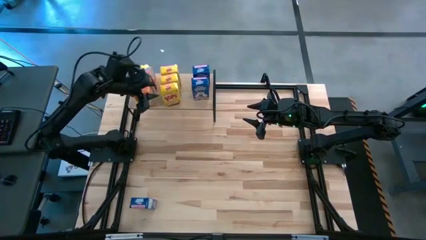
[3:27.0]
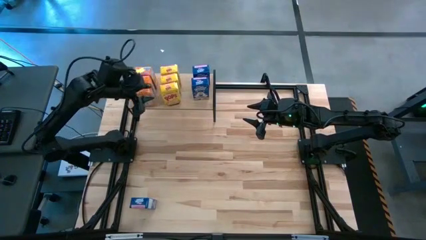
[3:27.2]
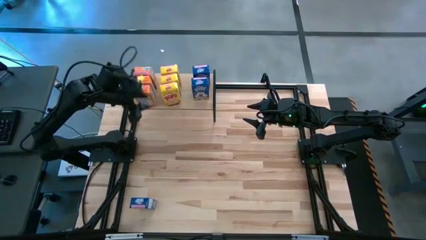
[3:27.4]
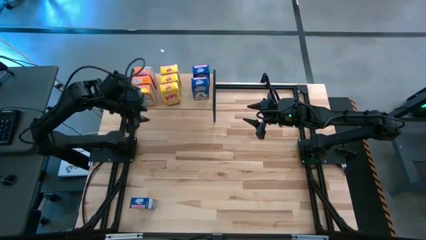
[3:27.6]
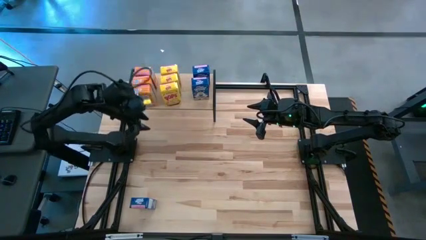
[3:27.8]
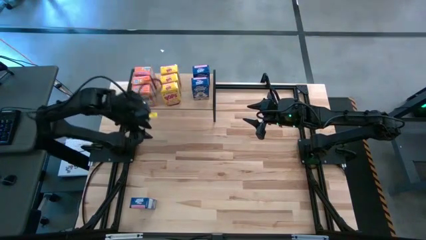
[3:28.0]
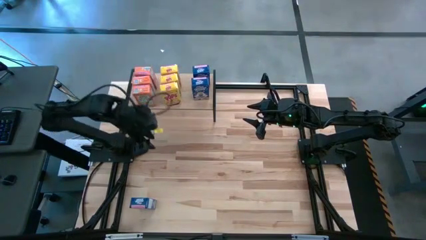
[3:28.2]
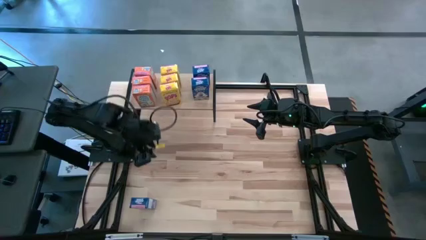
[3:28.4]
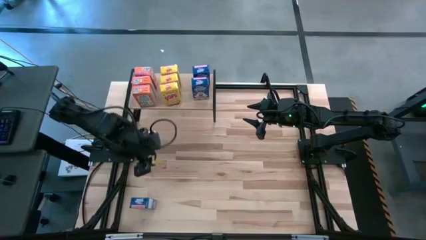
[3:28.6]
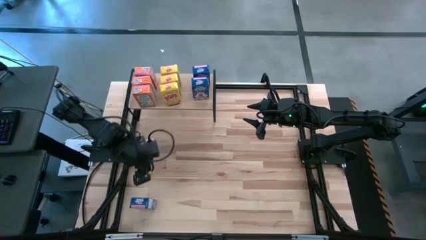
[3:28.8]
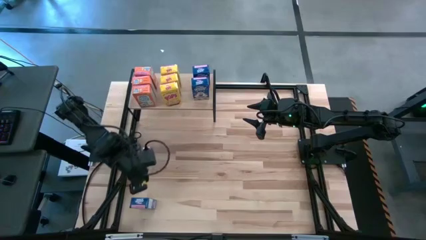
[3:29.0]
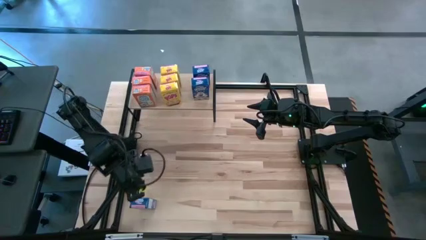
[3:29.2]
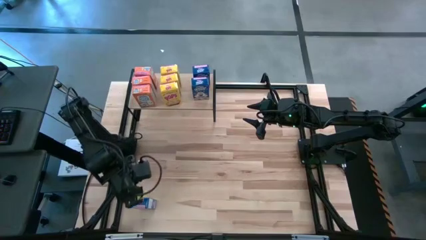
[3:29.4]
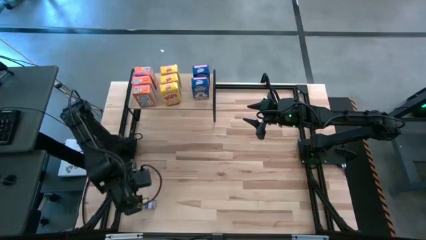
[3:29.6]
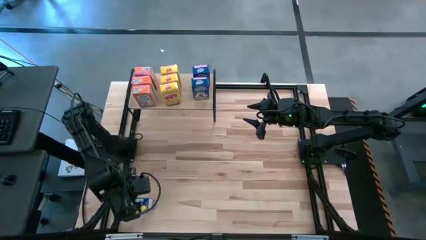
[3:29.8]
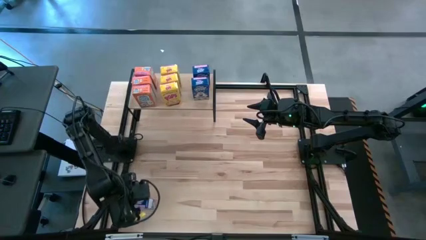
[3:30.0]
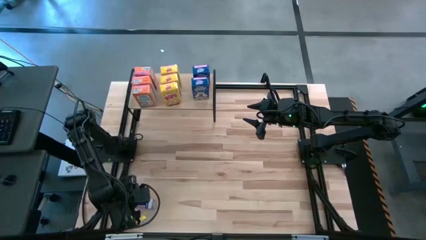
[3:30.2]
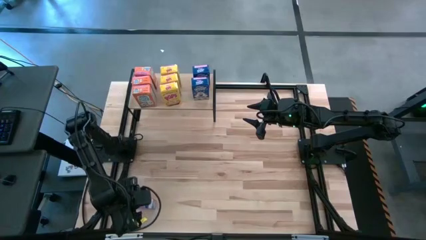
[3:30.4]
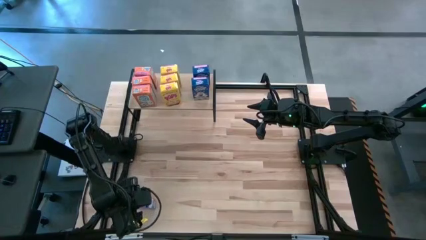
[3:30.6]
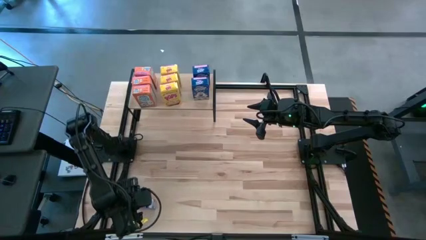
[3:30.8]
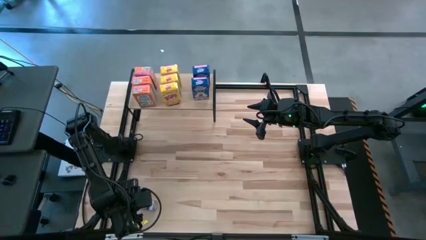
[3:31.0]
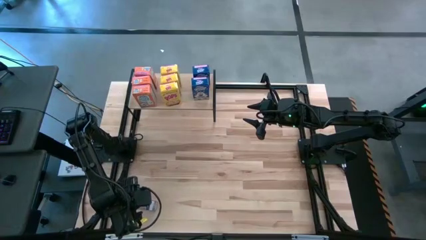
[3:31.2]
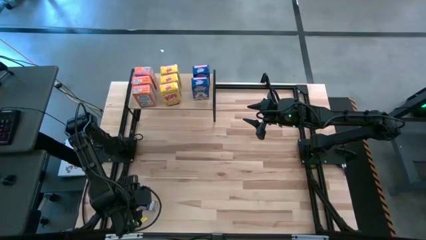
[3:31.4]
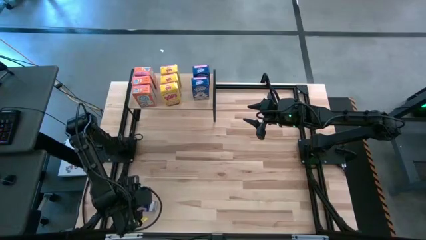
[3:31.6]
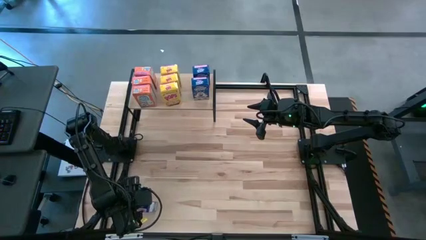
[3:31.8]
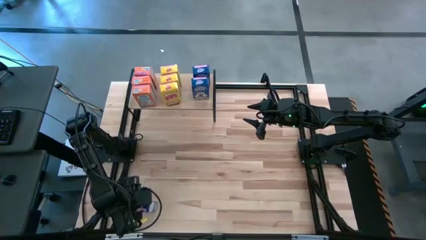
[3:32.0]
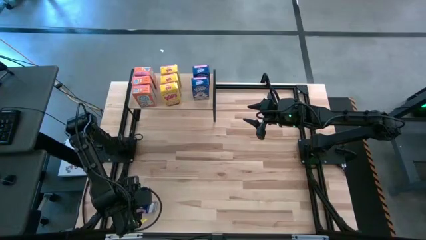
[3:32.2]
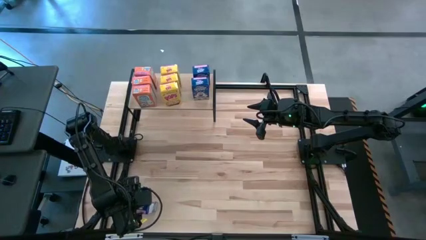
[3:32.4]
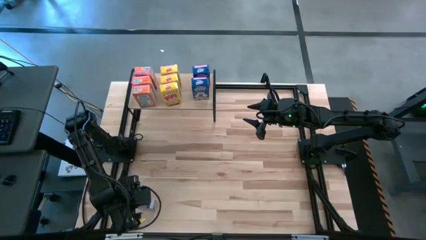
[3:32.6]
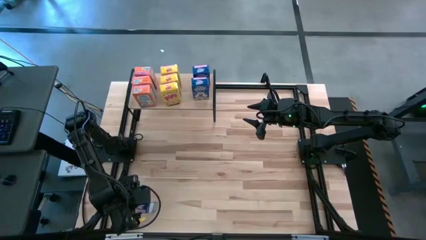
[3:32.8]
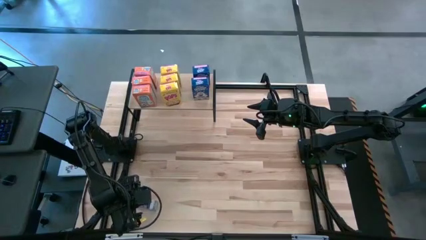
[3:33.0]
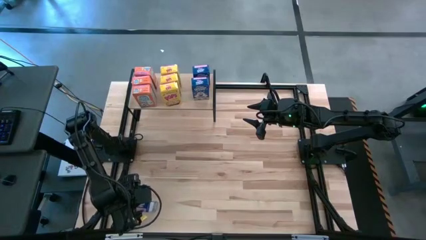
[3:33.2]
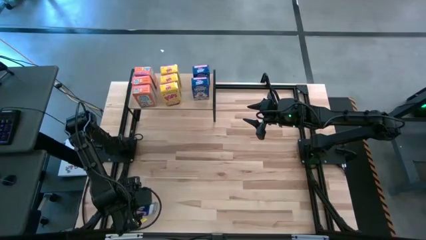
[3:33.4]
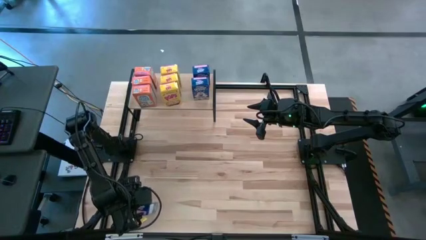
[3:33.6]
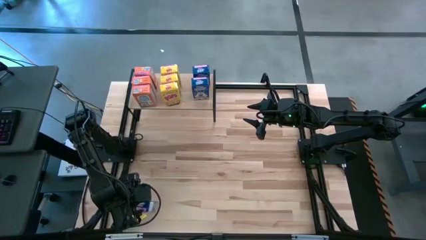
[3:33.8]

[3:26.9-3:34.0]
Task: Stack cereal on shelf
Put the blue cereal box on the shelf aligned with the other blue cereal boxes

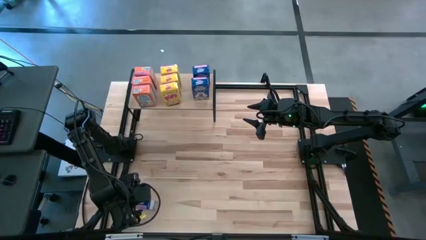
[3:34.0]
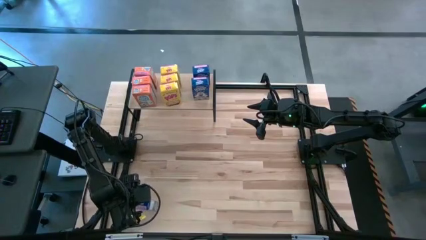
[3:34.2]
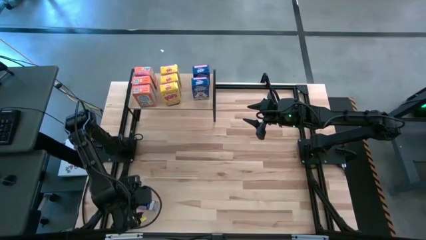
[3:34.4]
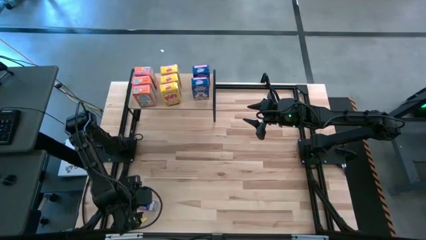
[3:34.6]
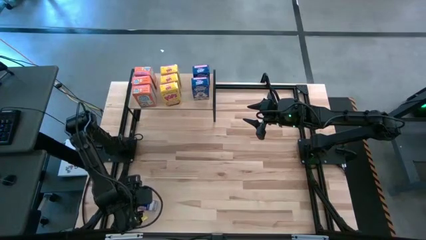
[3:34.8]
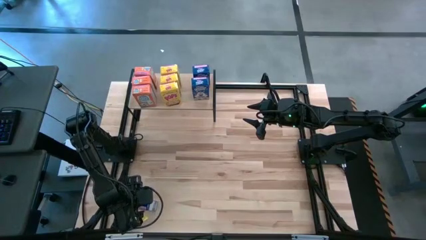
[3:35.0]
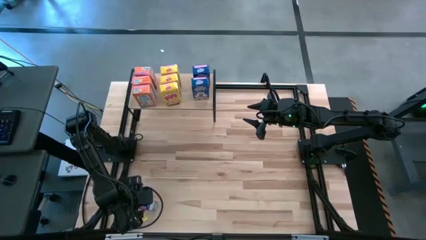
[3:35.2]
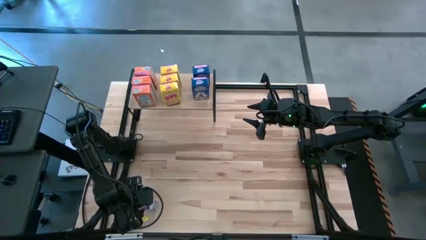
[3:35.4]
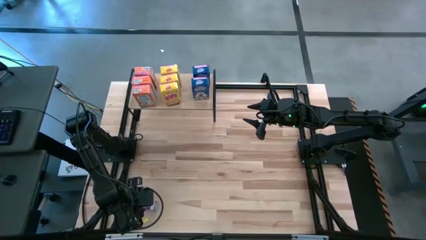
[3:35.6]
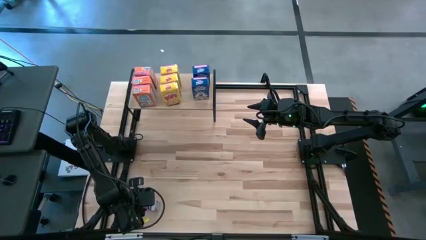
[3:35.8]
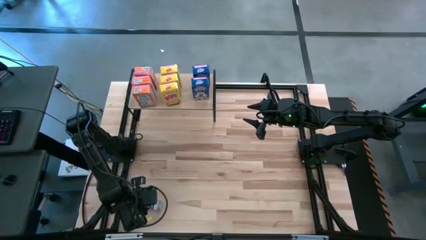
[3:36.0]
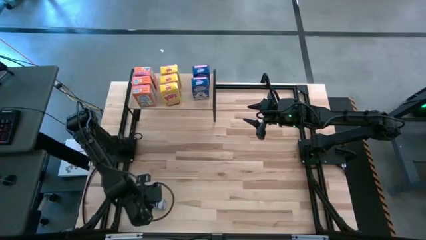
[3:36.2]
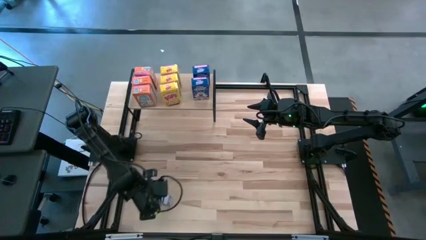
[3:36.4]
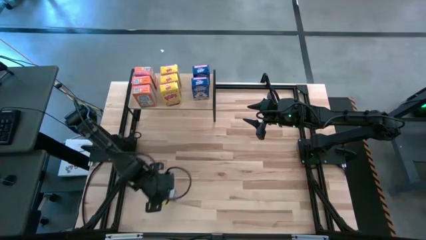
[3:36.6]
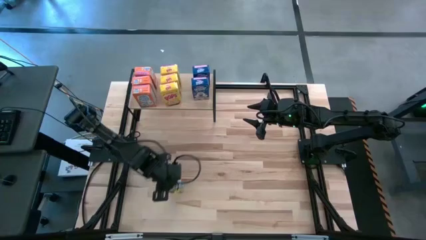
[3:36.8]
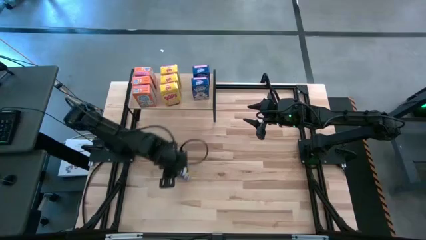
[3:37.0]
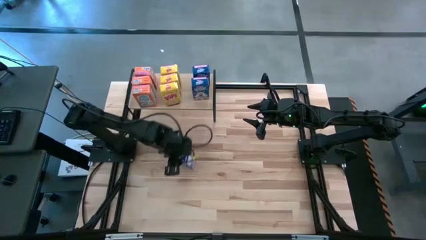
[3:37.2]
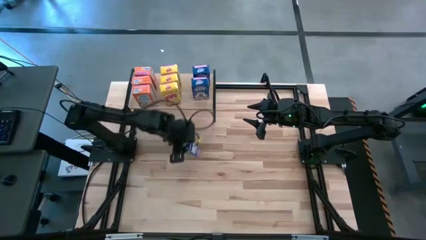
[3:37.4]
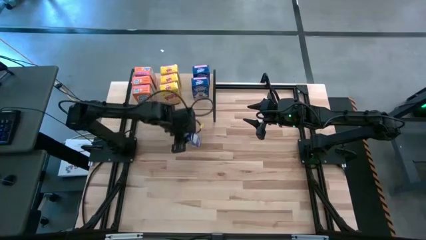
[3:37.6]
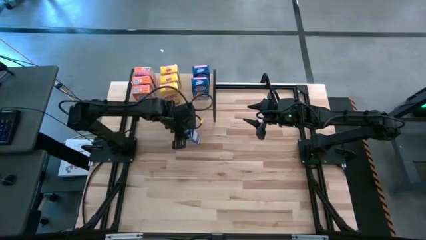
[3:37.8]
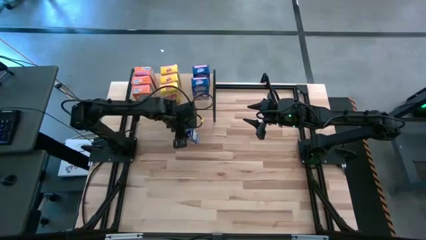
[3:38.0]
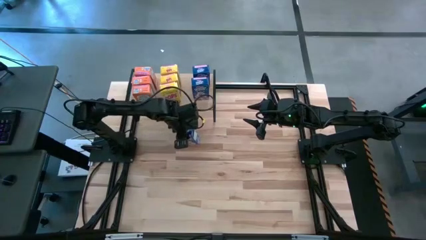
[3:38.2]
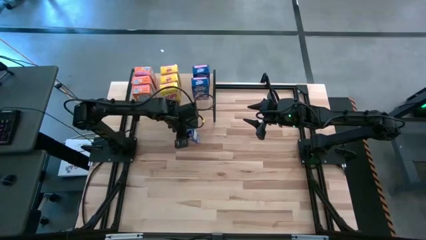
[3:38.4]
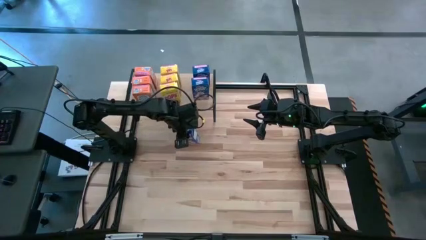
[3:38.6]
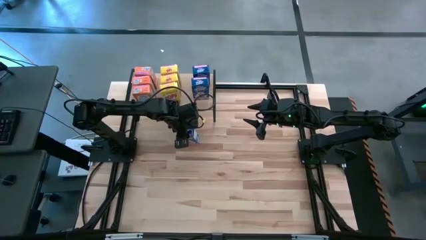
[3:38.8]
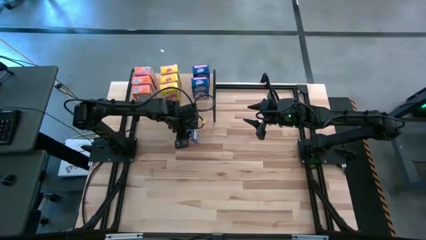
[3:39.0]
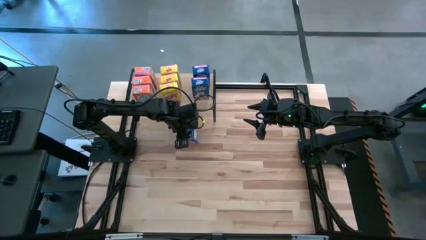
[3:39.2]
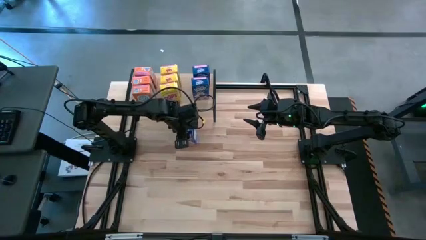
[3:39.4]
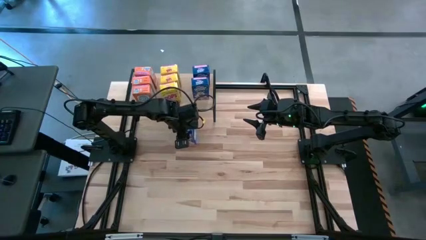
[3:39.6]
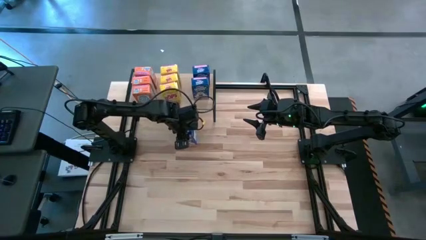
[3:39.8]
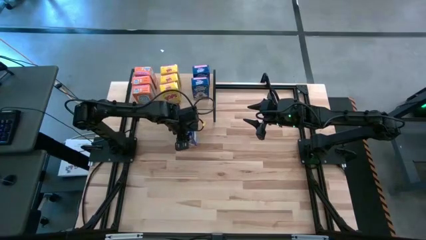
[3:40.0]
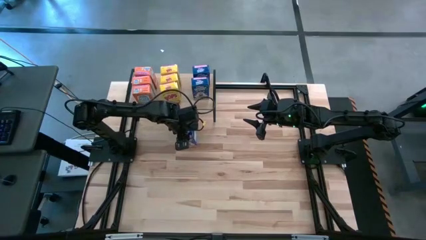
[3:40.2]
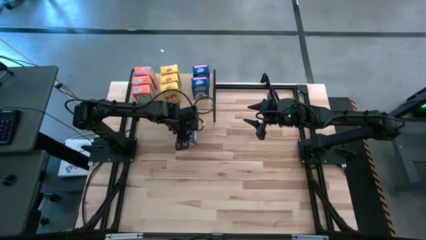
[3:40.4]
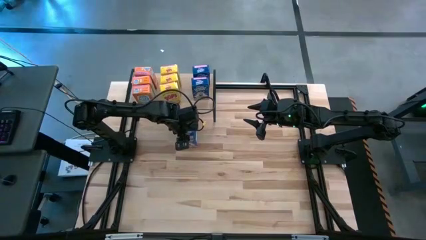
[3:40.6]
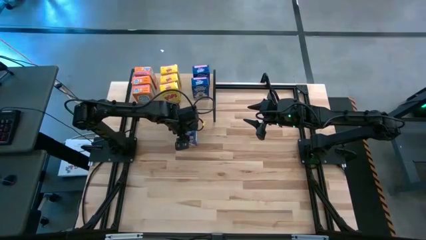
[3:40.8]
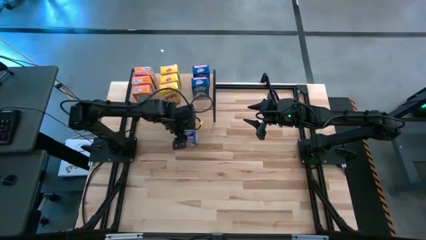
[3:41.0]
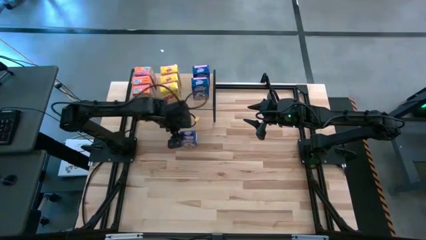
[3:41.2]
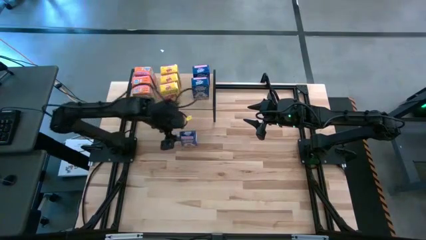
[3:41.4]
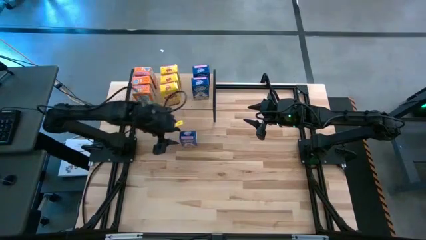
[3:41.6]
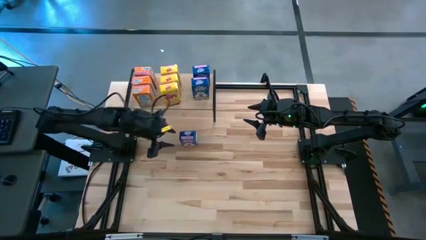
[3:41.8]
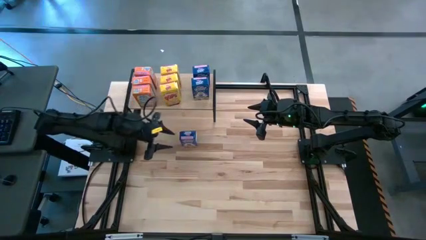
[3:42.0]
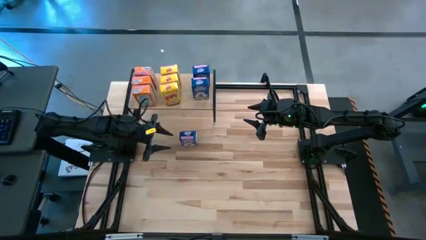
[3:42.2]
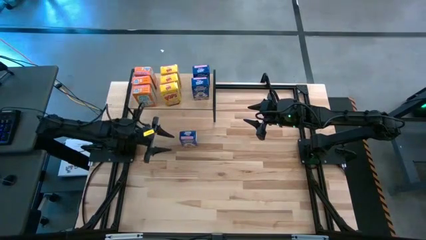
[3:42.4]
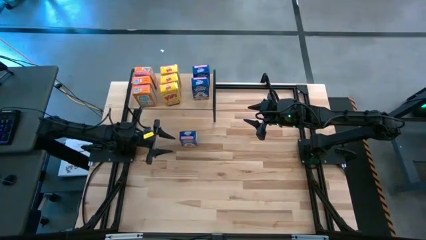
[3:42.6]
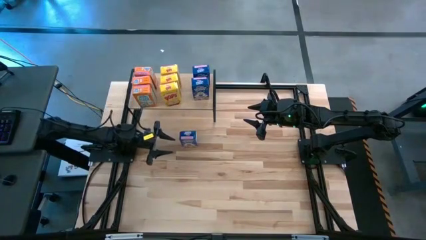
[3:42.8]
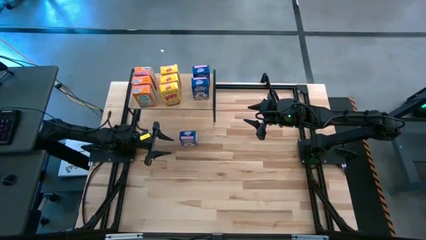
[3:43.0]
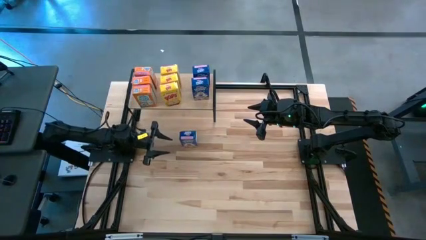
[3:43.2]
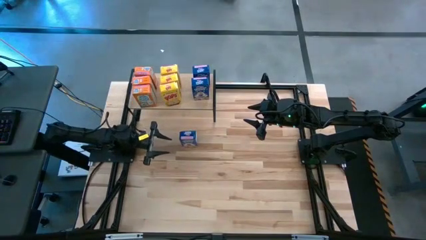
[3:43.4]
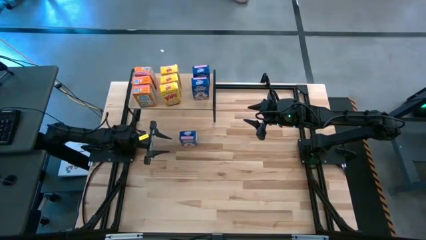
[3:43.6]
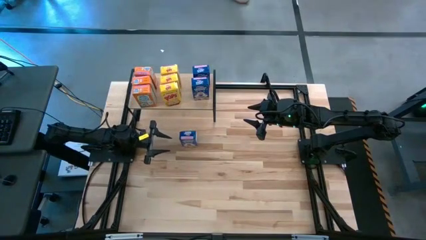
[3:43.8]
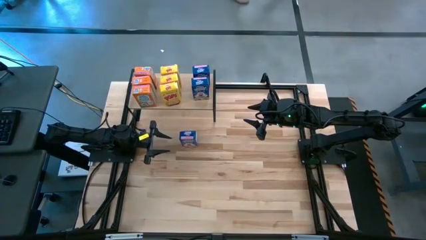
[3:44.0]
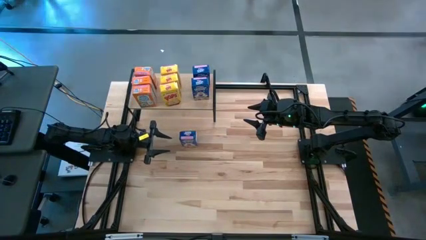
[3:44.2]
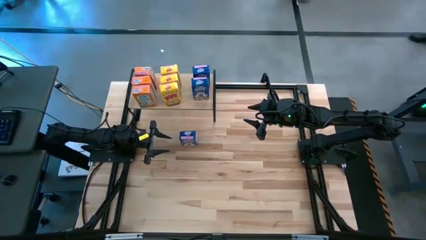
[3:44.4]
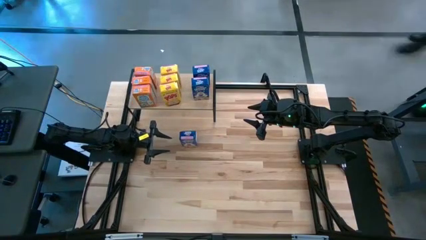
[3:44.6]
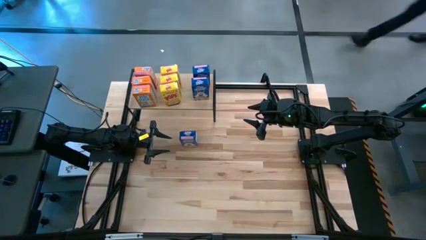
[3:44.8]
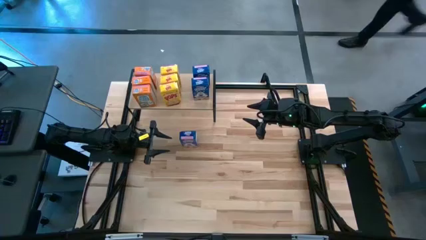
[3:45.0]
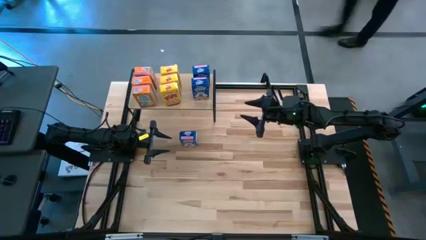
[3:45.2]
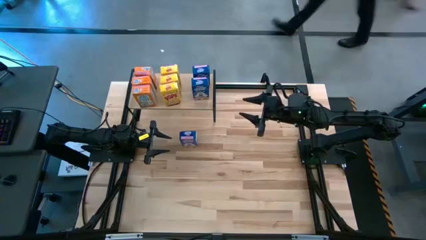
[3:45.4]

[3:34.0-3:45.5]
Put the blue cereal box on the shelf aligned with the other blue cereal boxes
